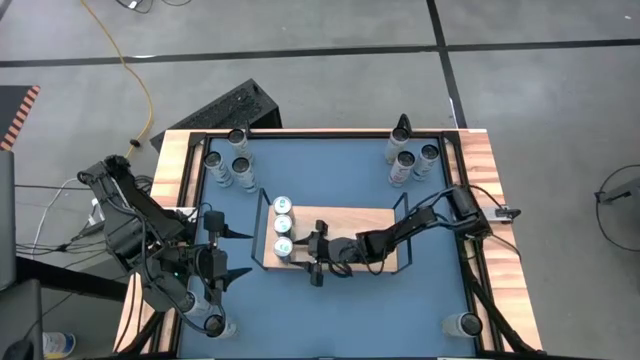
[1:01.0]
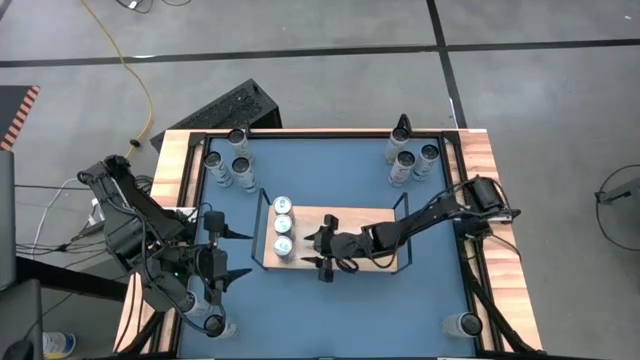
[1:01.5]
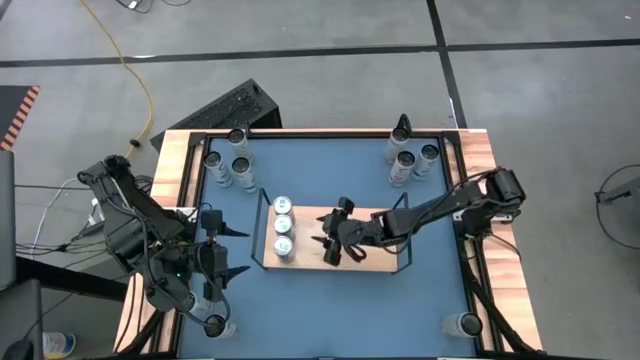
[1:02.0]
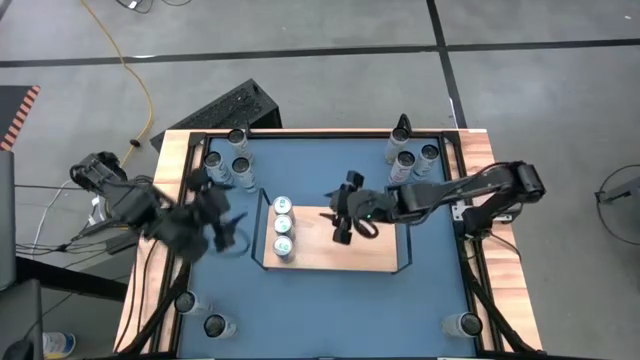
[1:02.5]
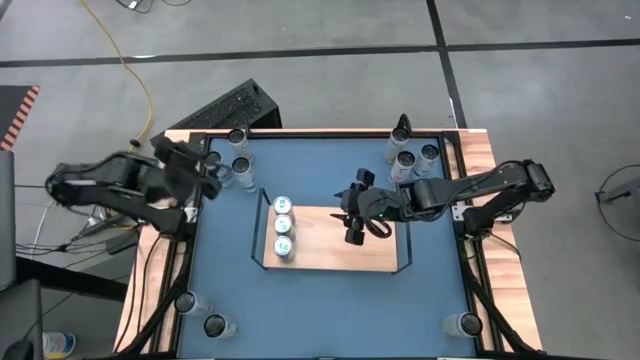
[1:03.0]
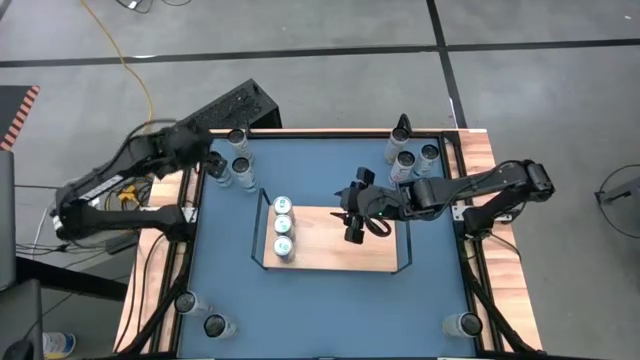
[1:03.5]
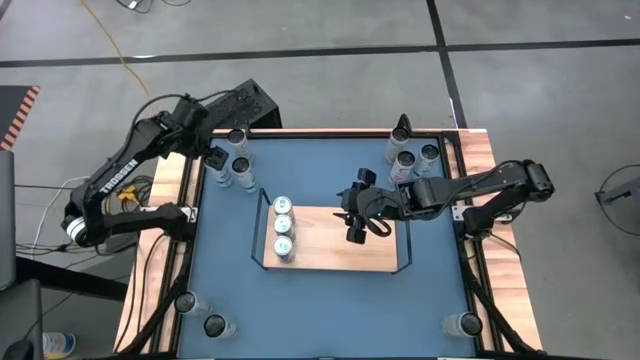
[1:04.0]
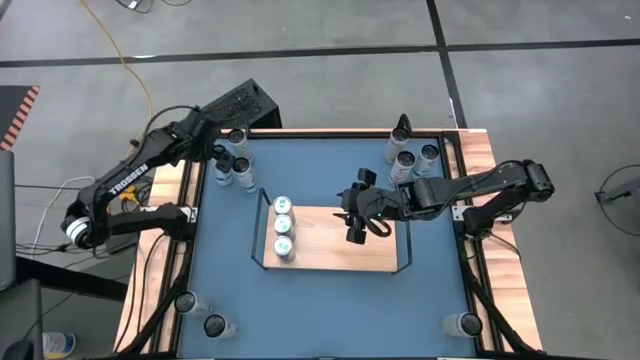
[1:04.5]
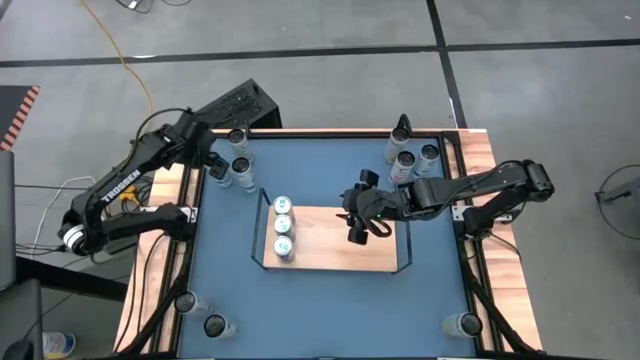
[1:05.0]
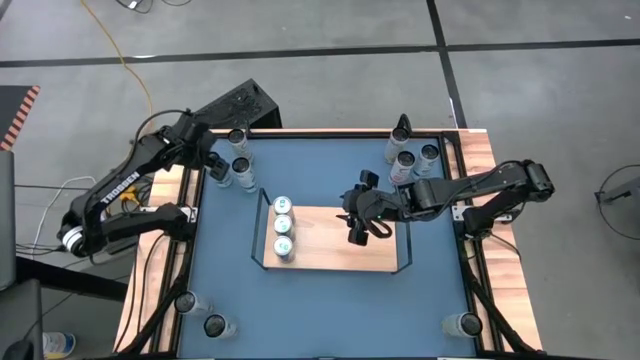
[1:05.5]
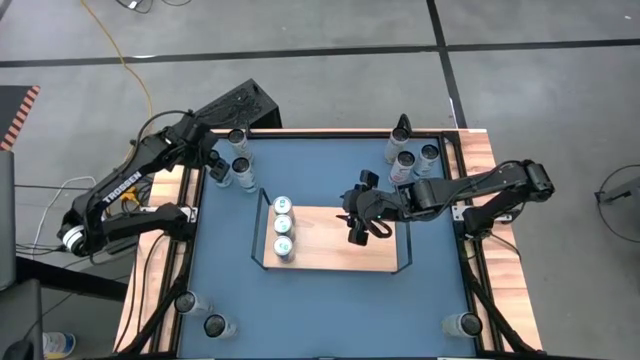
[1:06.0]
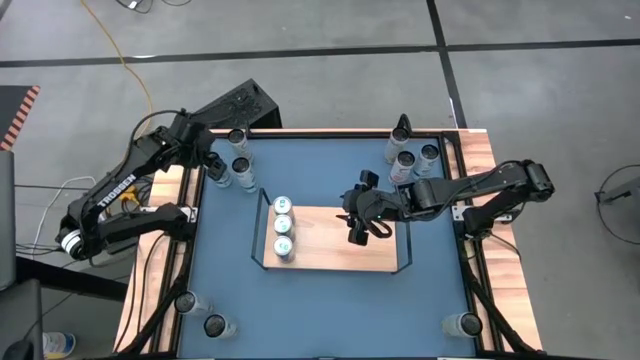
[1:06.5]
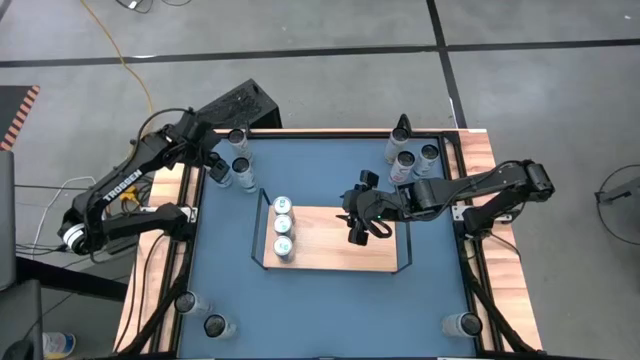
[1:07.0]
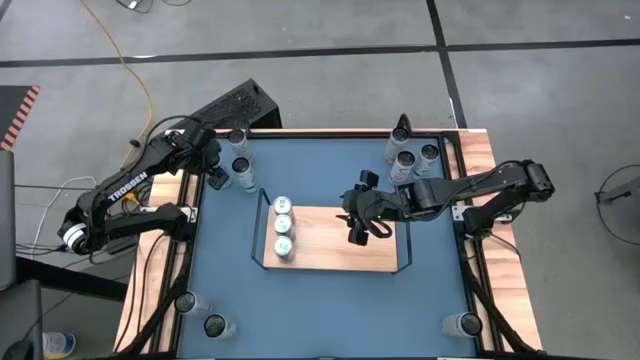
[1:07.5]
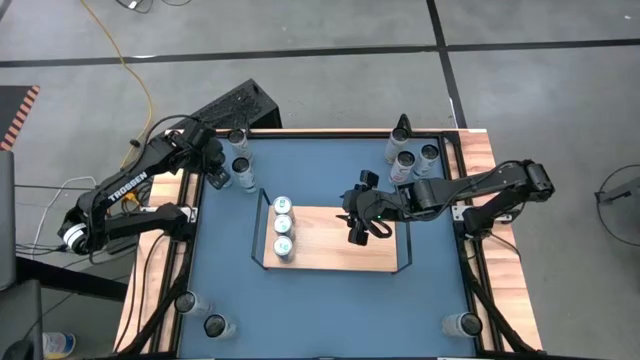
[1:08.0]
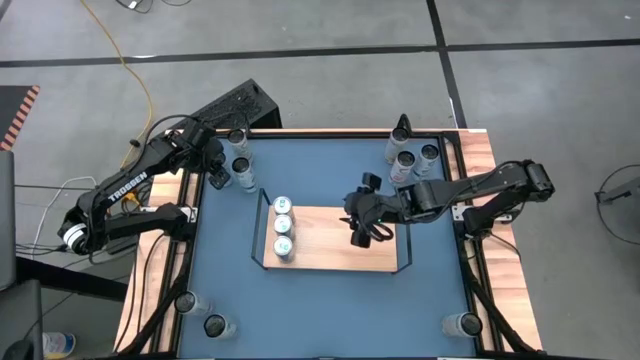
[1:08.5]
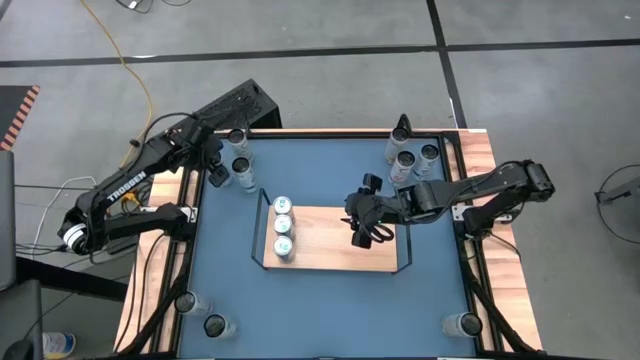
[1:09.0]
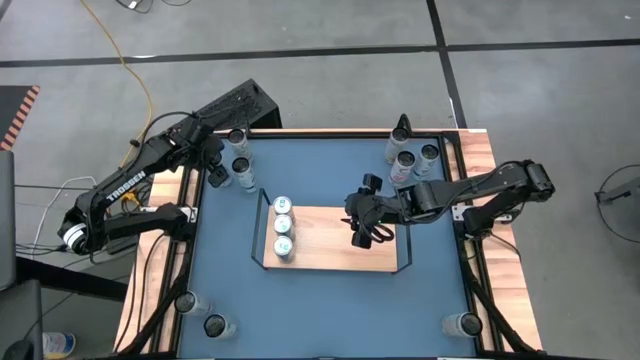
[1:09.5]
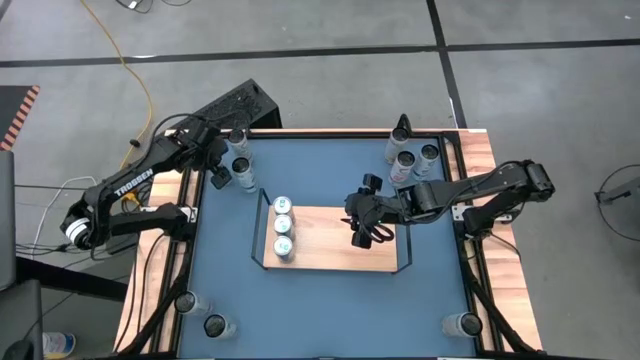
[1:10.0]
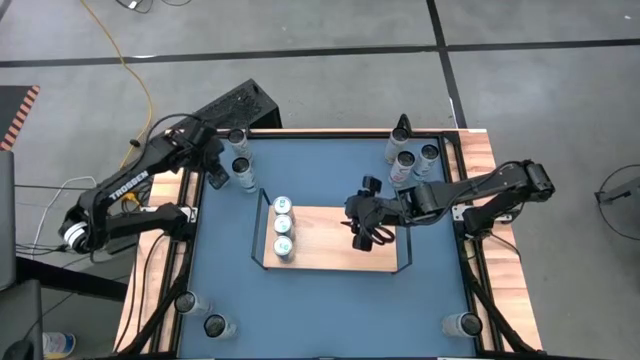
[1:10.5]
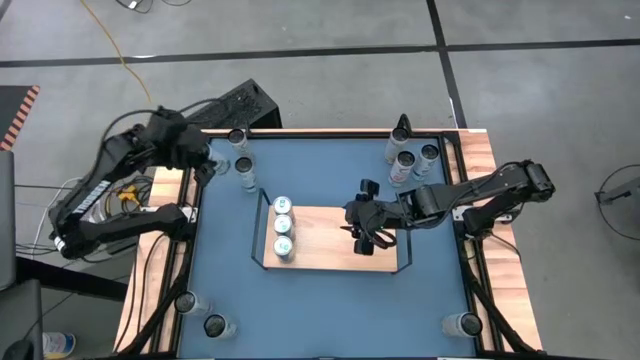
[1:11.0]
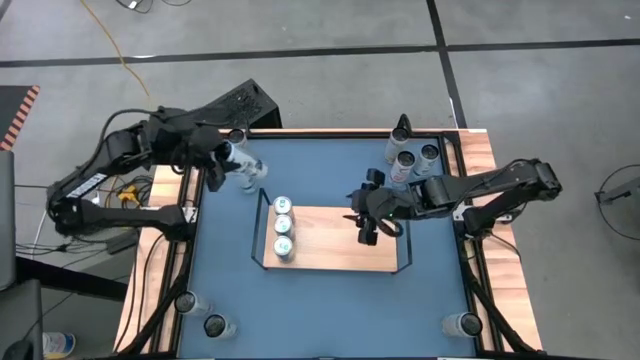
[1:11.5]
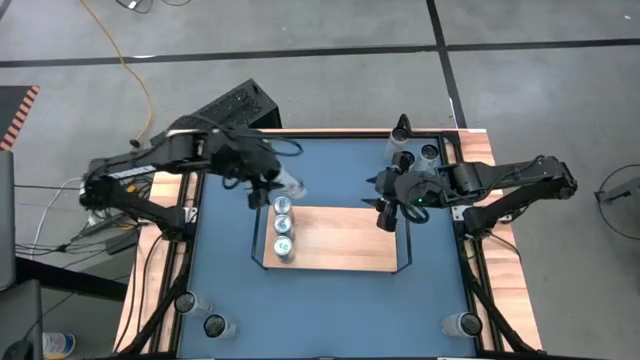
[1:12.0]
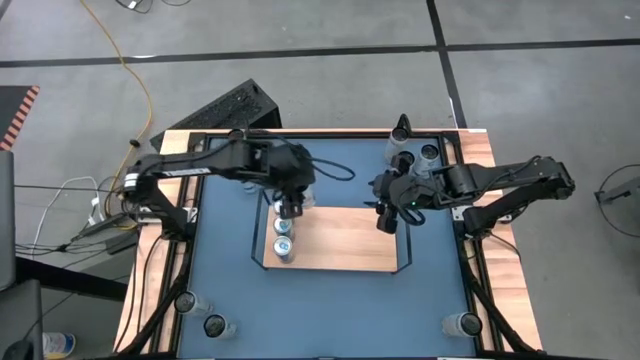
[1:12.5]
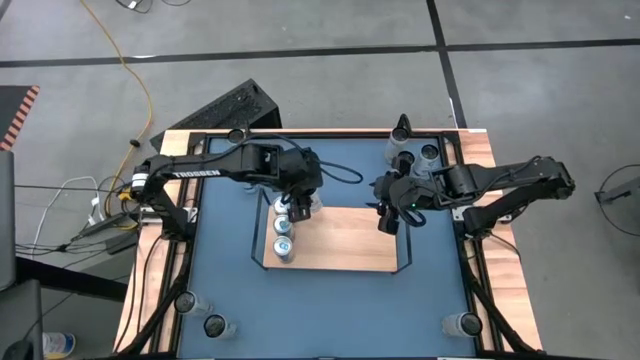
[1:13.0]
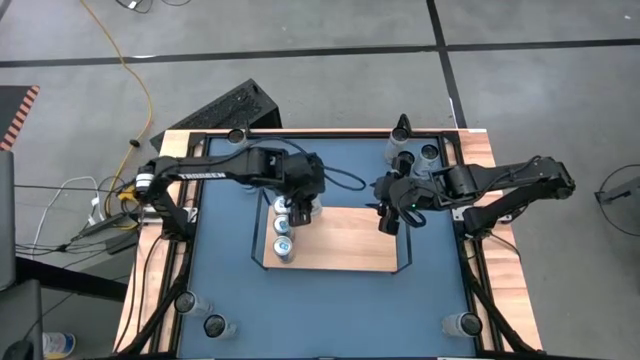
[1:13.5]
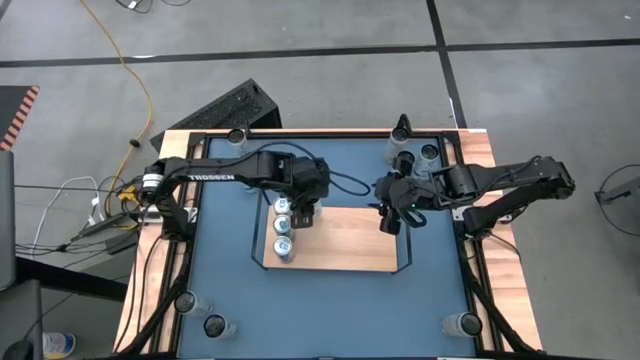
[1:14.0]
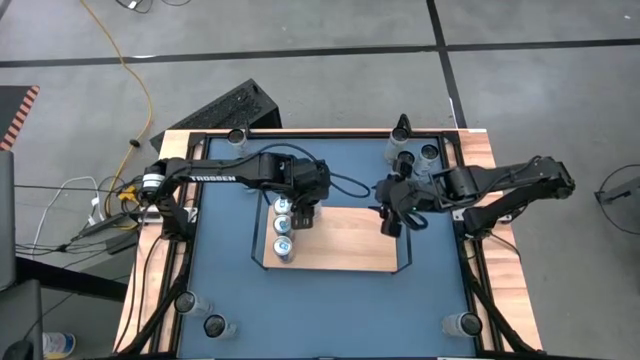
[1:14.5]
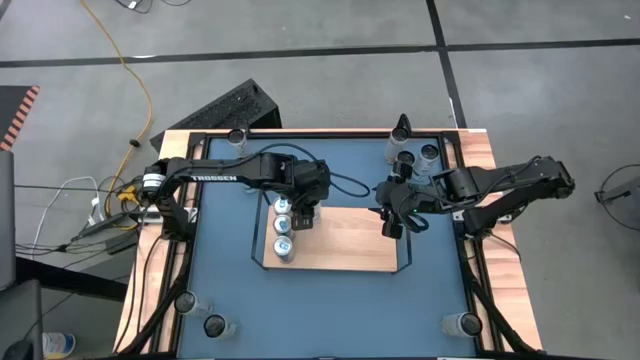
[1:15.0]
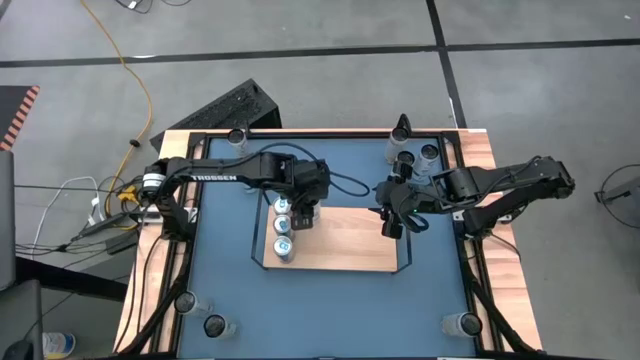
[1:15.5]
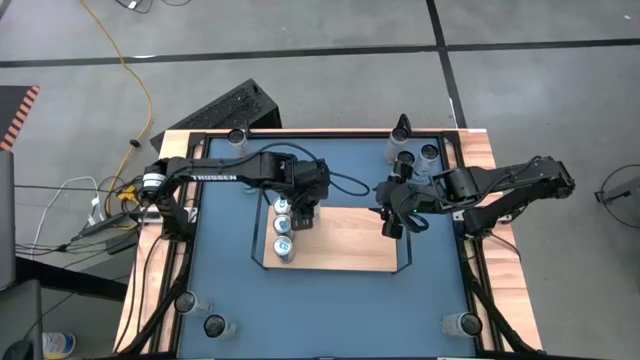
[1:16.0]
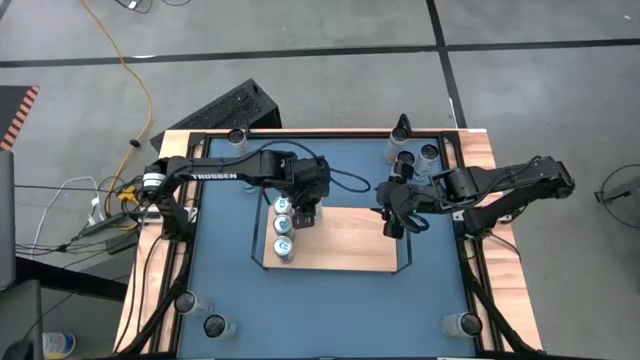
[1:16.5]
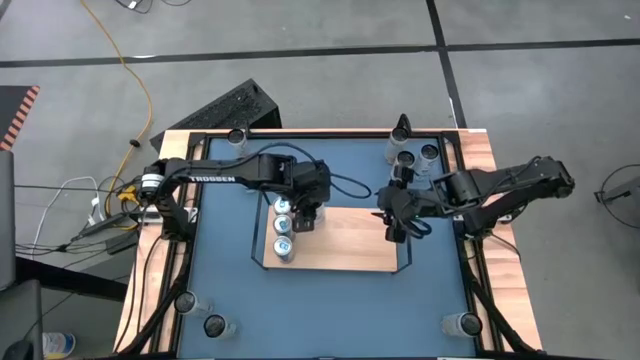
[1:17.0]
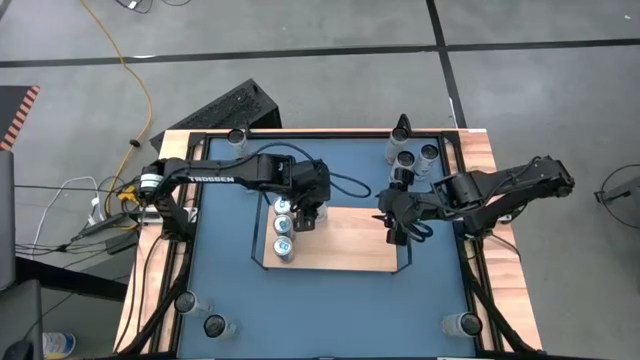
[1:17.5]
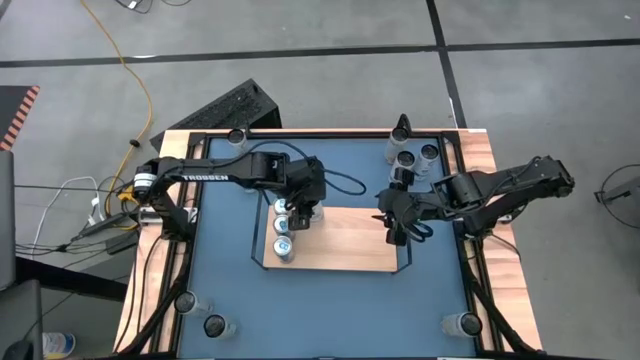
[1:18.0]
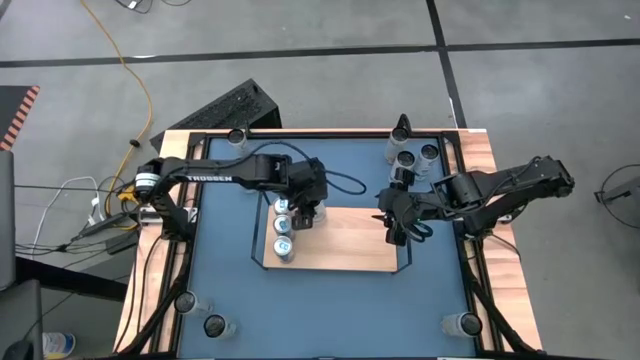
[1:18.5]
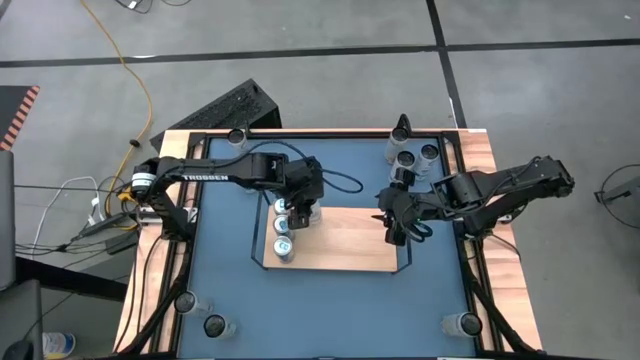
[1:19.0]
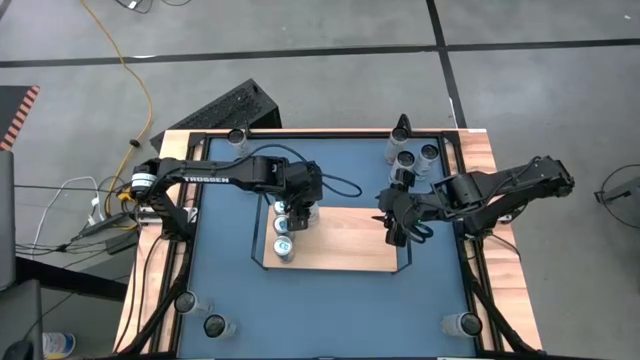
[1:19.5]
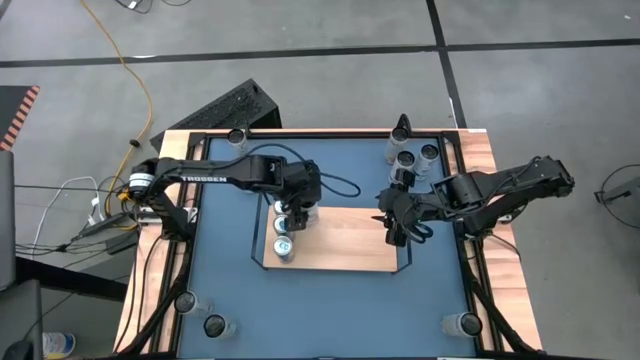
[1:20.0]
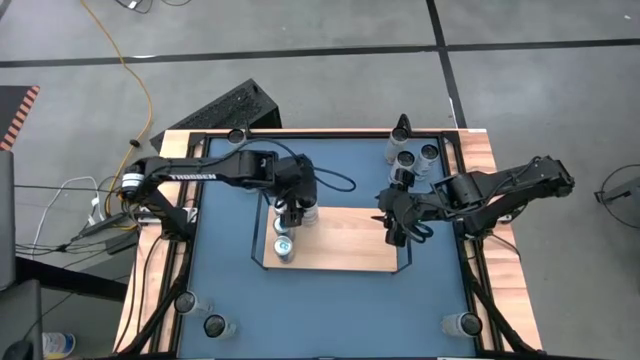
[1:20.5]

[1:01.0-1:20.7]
Task: Place canned beverage on shelf
Put the left blue soda can on the shelf

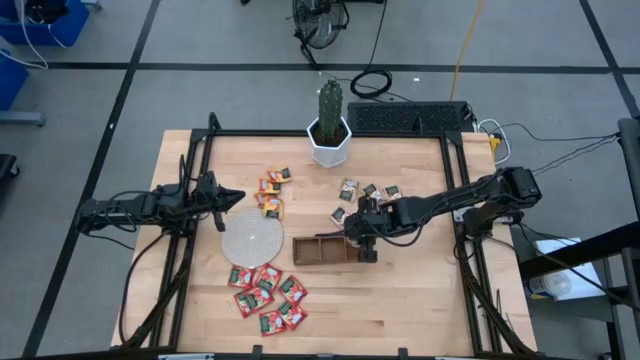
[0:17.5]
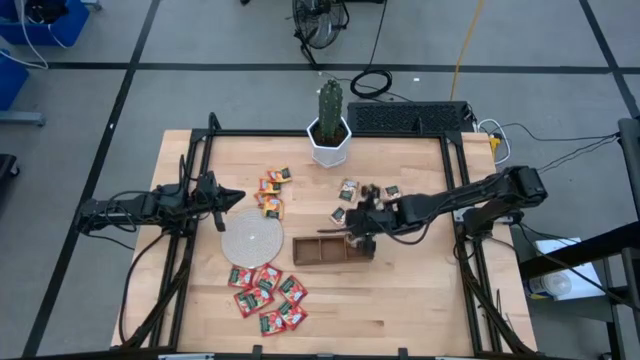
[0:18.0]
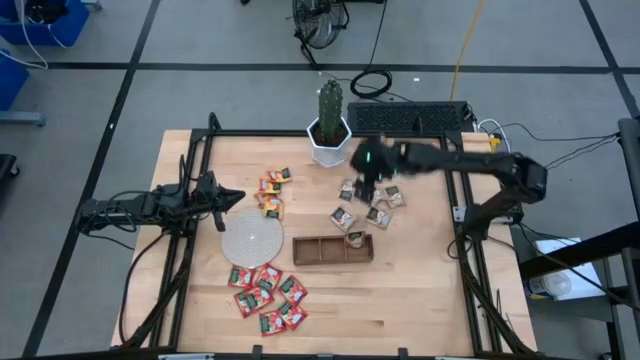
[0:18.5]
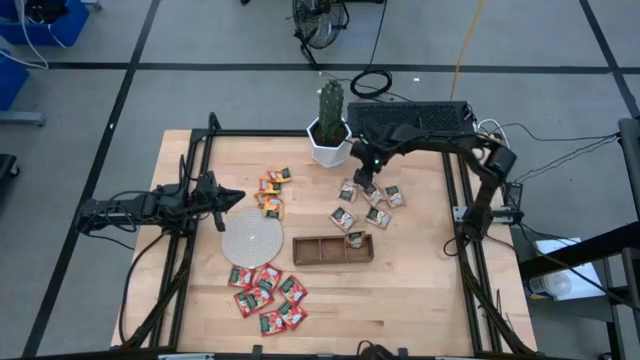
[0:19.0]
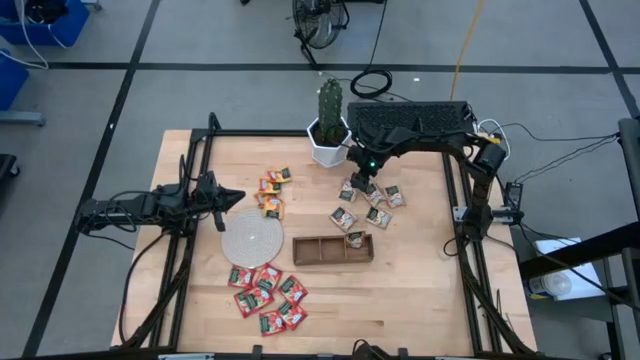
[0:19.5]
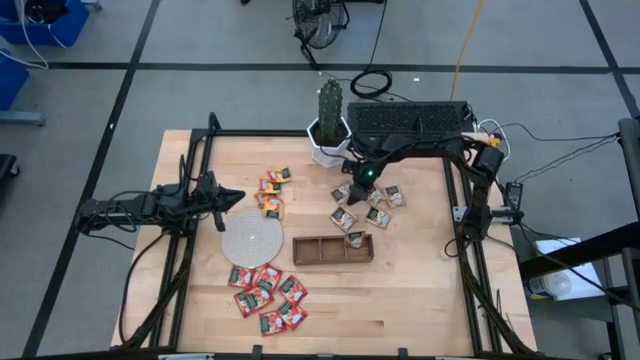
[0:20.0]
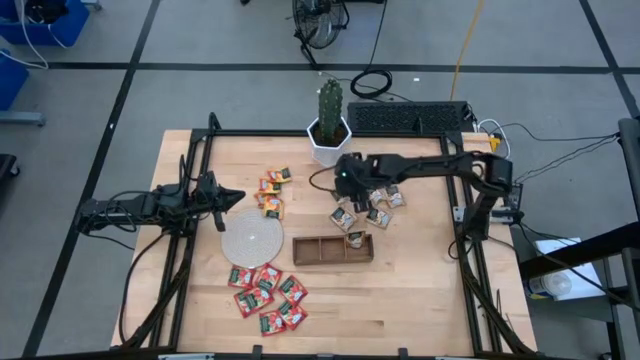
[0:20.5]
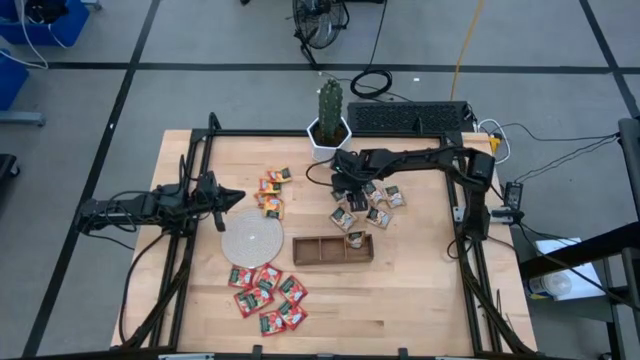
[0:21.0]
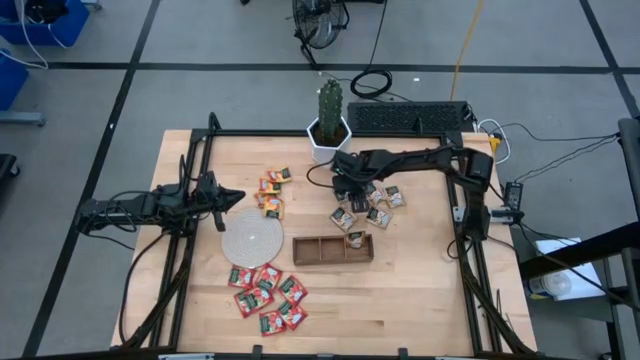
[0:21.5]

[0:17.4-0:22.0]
Task: Pick & Place Tea
Put the brown tea bag into the right section of the wooden organizer
